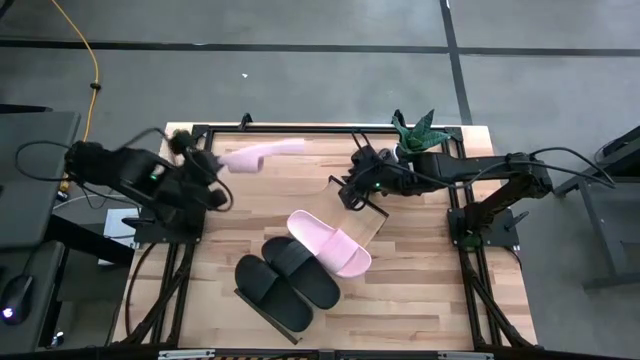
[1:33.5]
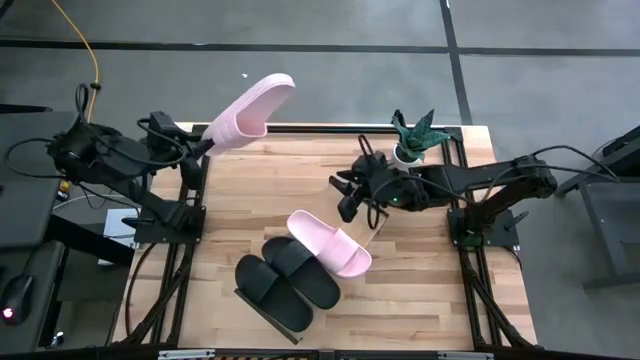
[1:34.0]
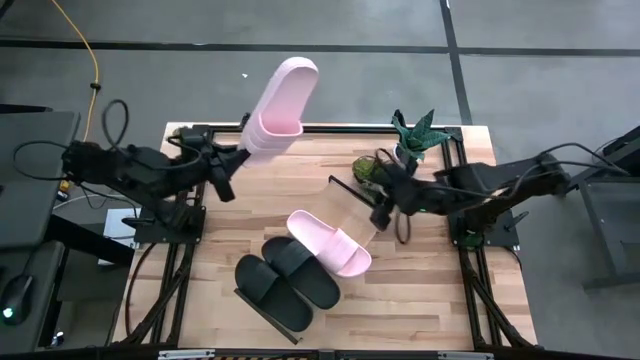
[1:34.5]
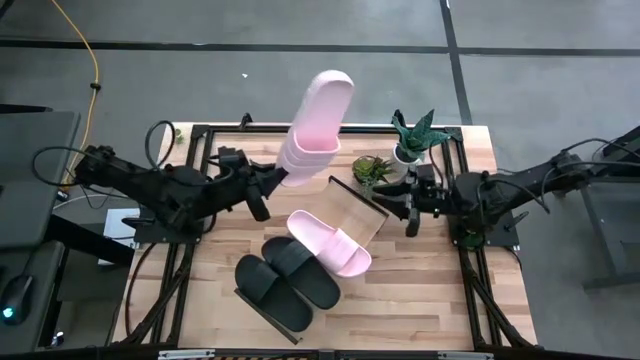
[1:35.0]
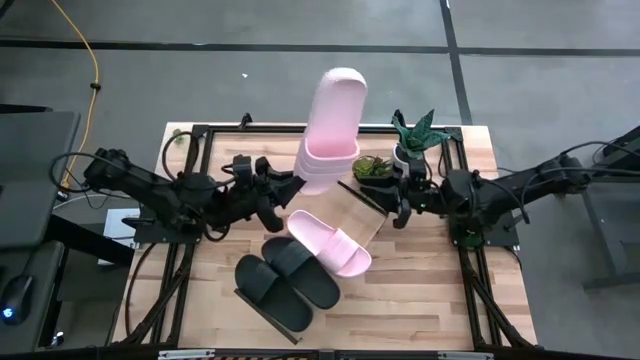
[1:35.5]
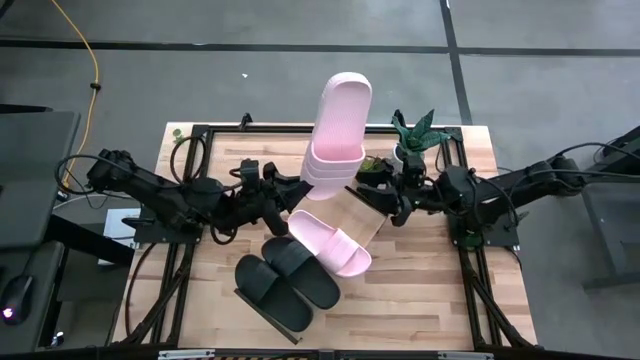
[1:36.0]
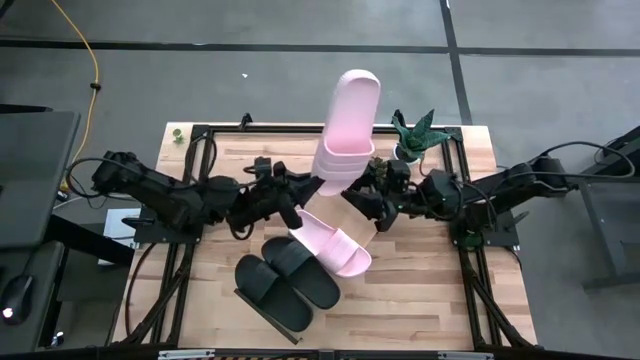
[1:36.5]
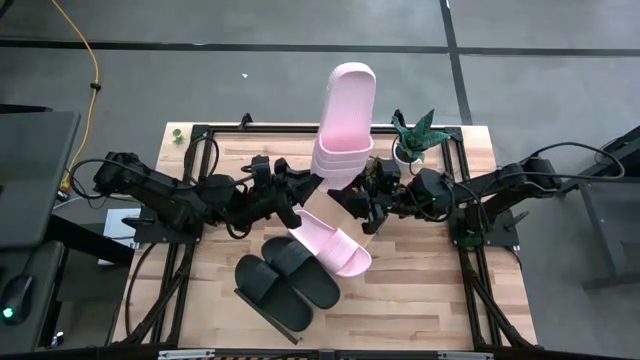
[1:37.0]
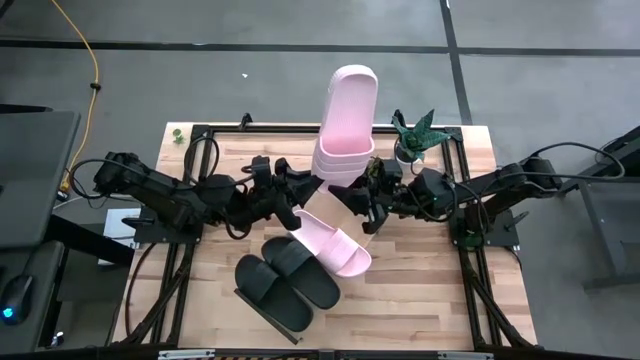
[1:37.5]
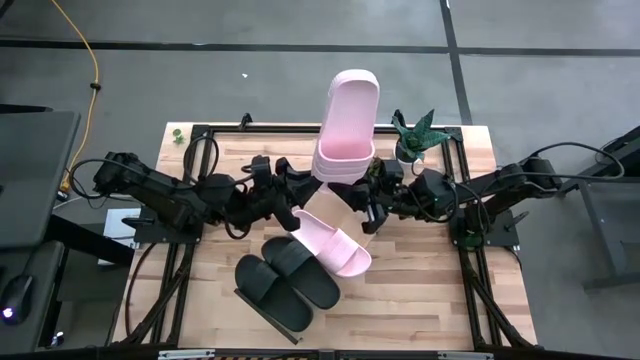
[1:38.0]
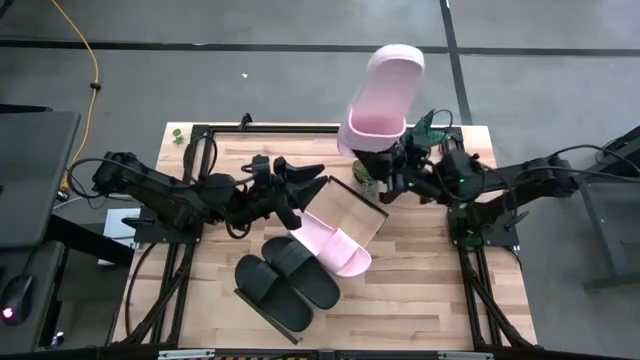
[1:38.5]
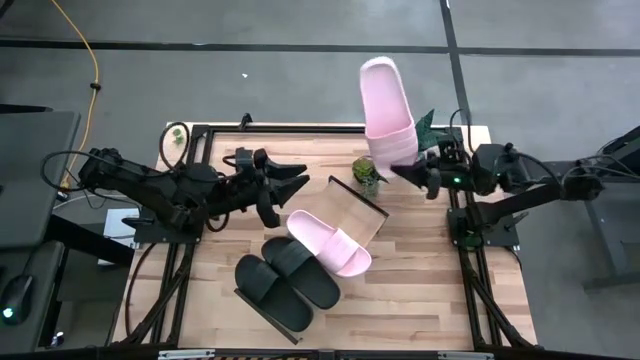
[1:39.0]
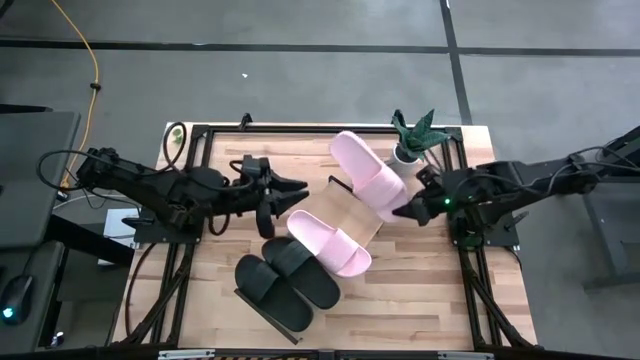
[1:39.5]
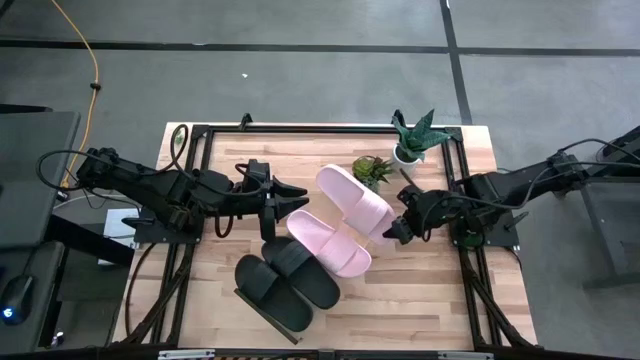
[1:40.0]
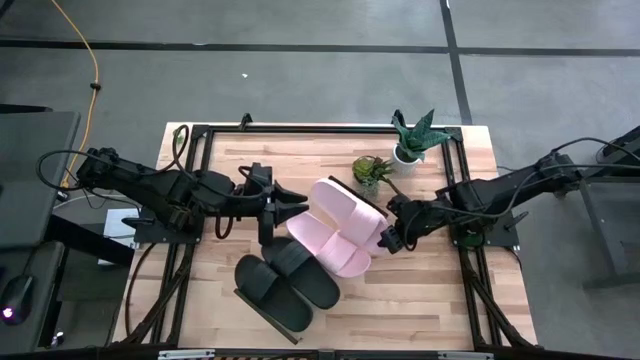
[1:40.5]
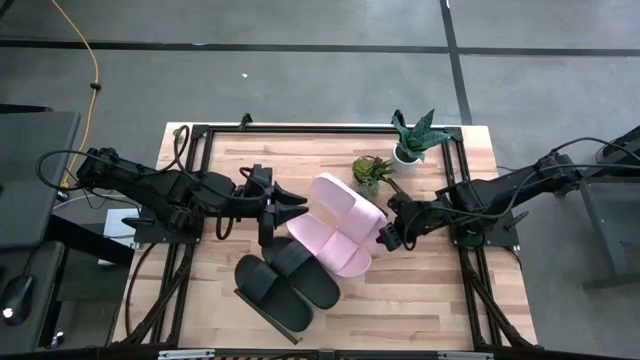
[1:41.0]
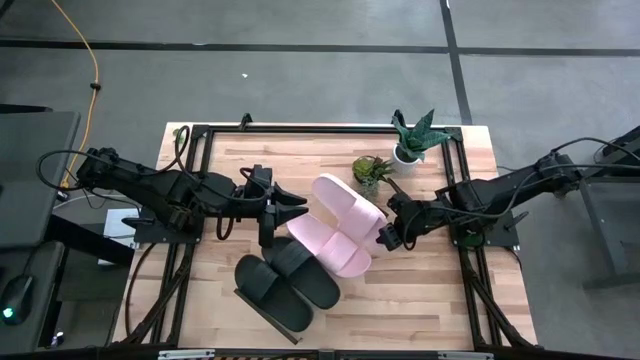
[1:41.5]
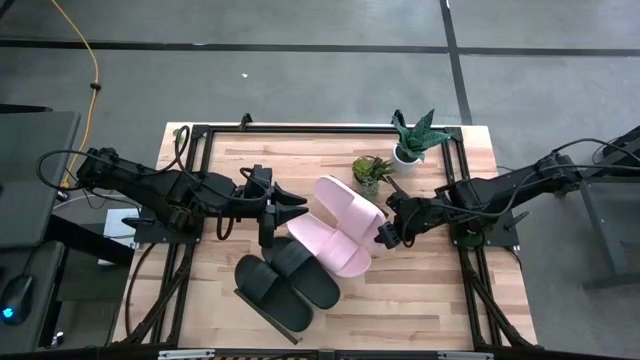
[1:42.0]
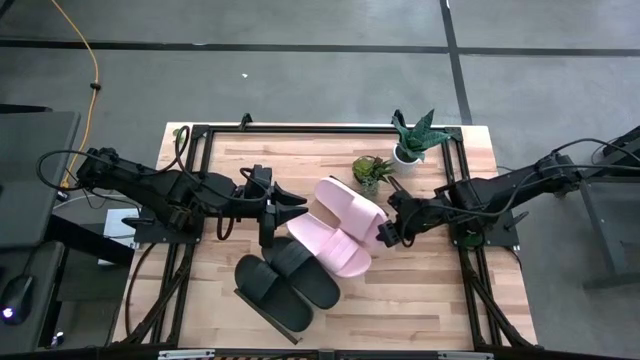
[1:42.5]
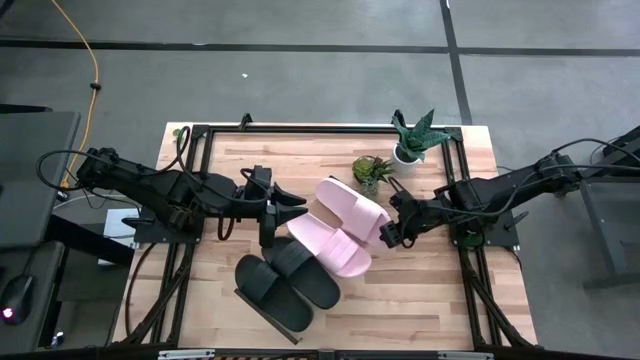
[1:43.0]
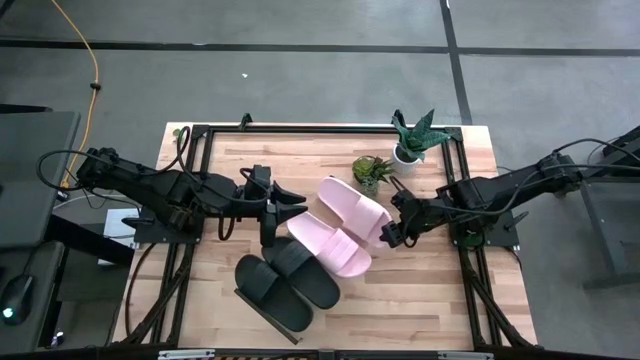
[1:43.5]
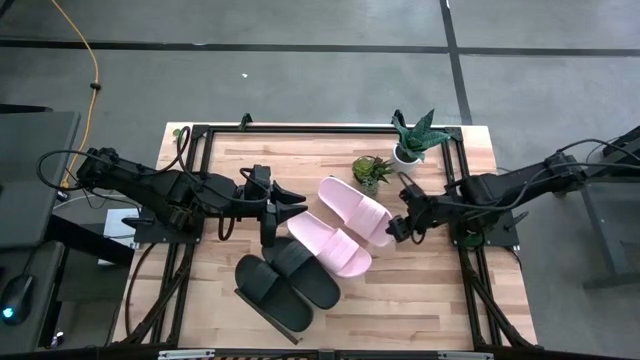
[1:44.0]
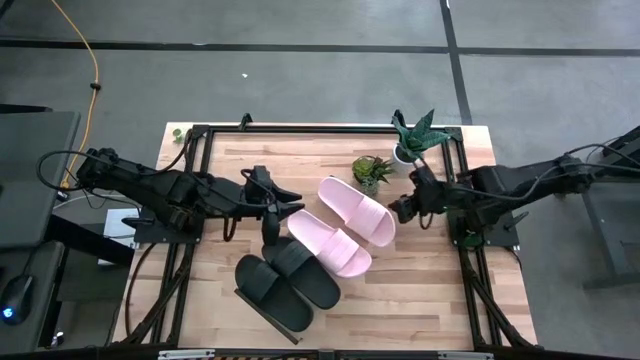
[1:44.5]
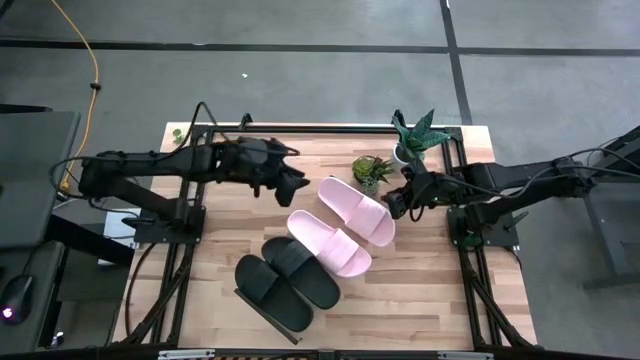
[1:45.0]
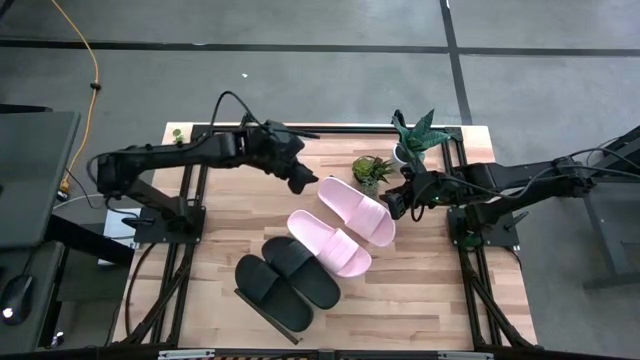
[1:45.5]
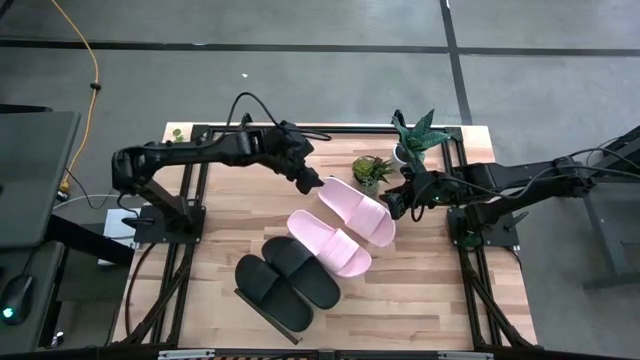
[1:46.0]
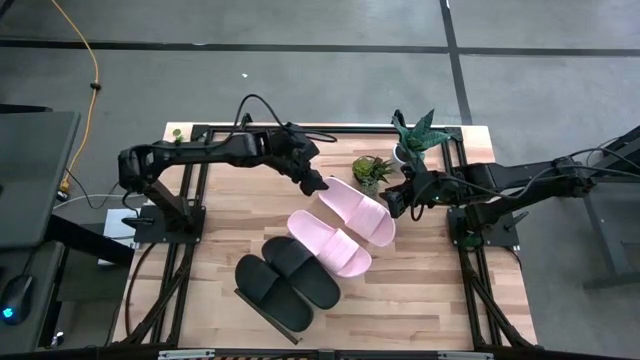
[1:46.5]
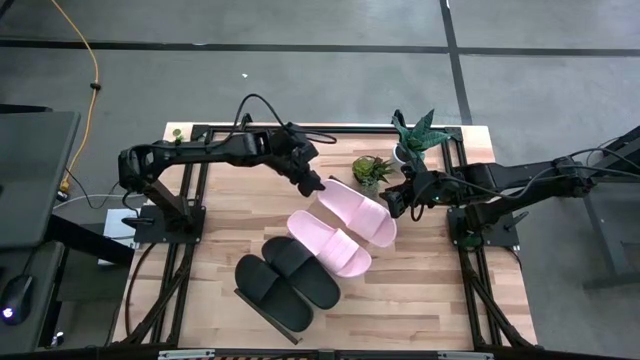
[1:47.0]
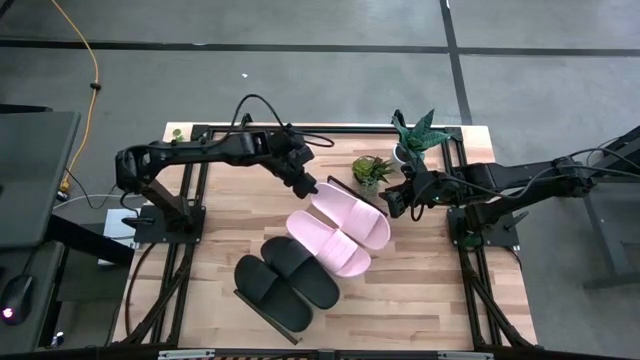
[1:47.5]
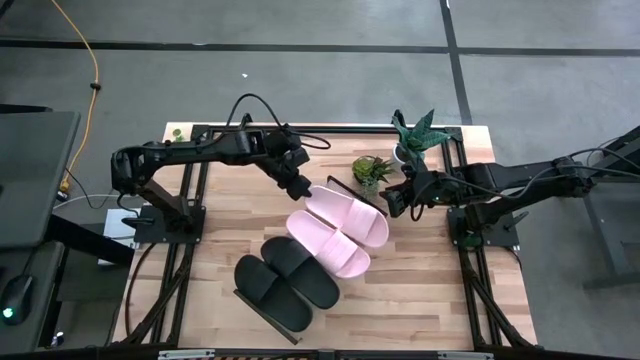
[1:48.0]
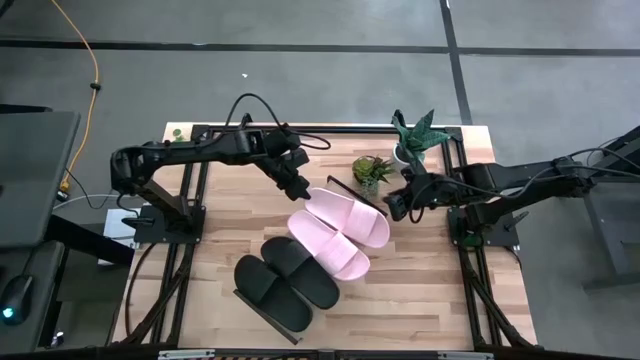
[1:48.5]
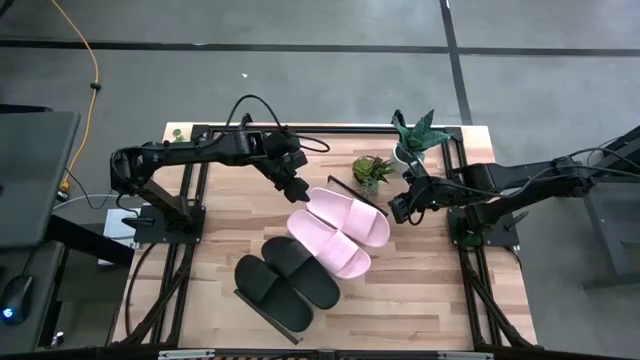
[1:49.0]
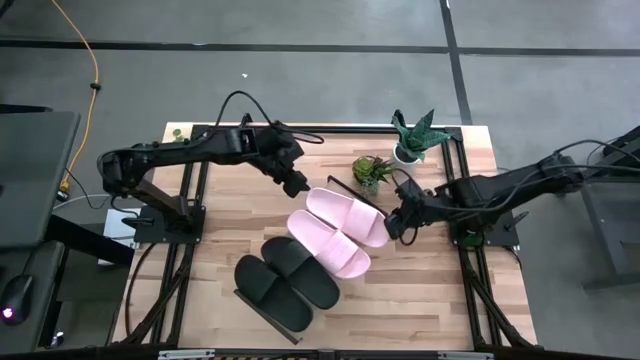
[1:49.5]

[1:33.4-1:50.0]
Task: Pick and place slides into the shelf
Put the pink slide on the shelf

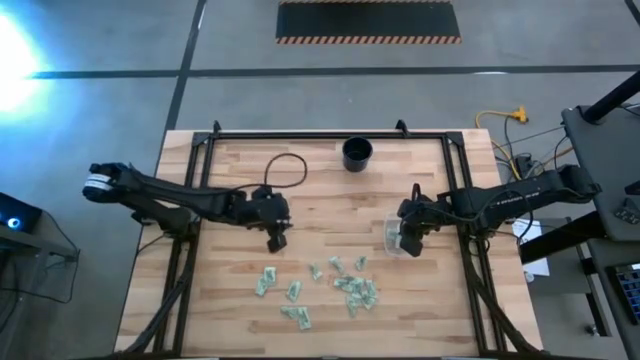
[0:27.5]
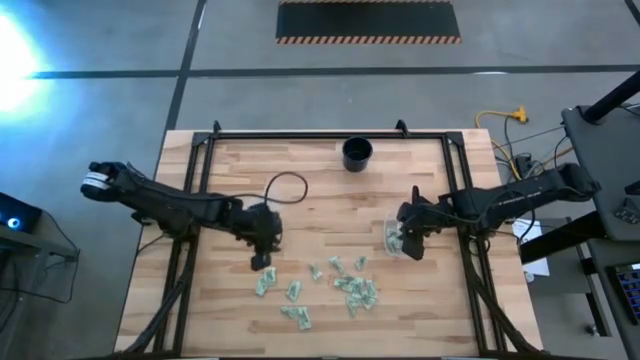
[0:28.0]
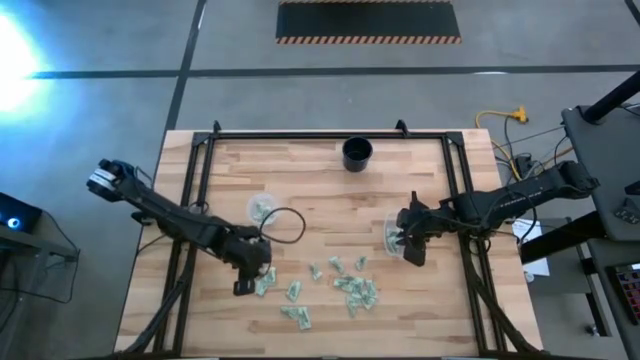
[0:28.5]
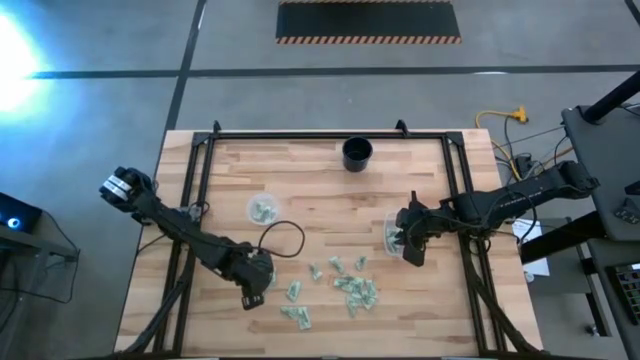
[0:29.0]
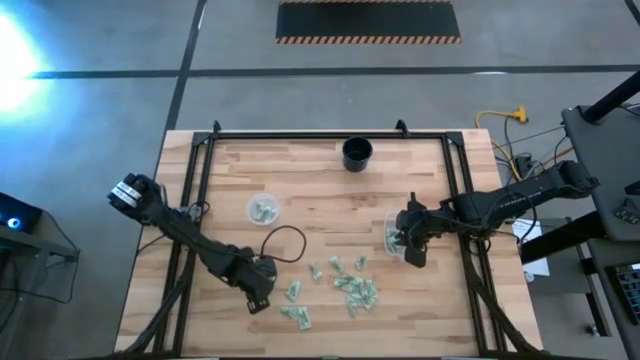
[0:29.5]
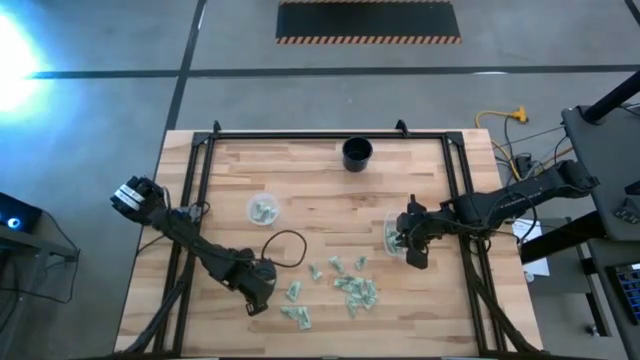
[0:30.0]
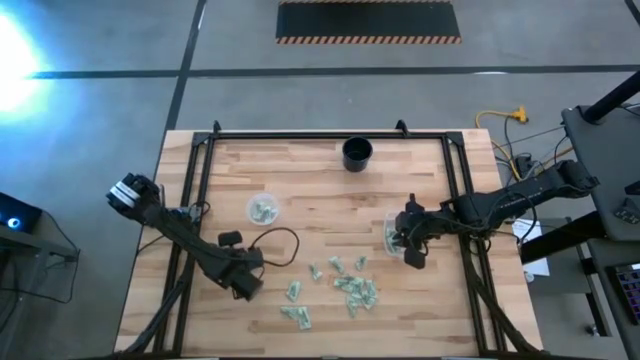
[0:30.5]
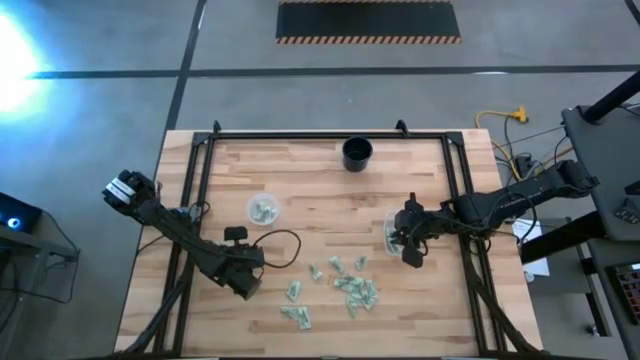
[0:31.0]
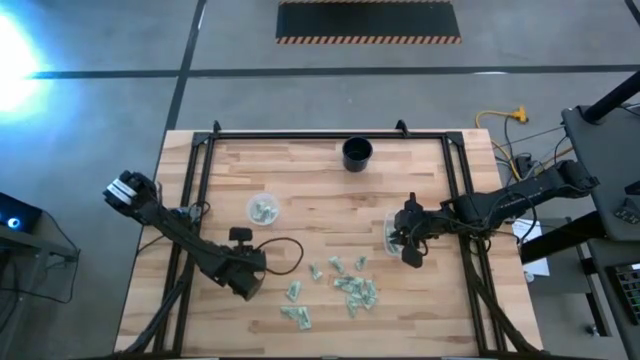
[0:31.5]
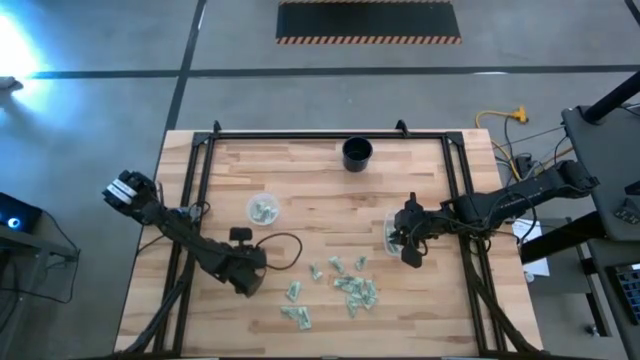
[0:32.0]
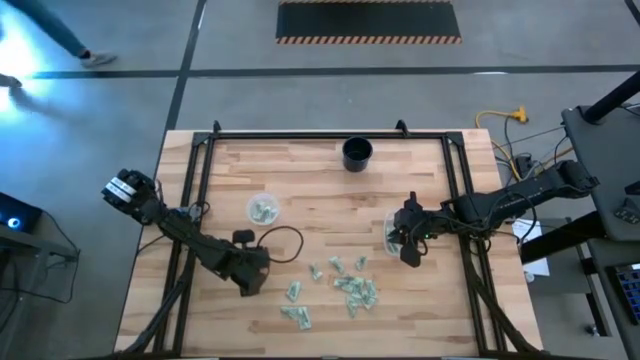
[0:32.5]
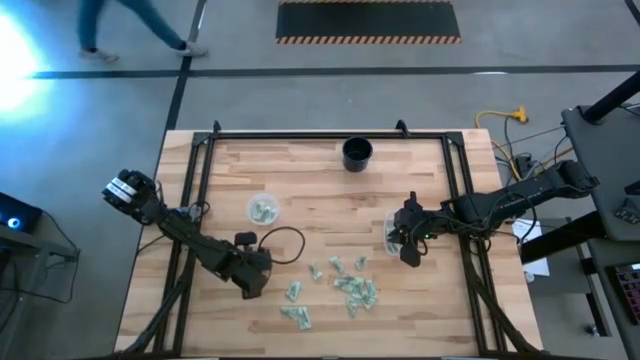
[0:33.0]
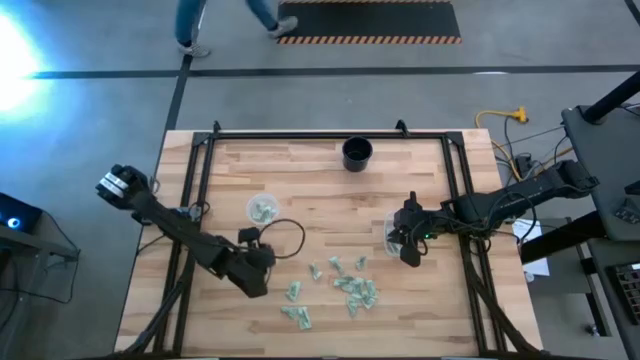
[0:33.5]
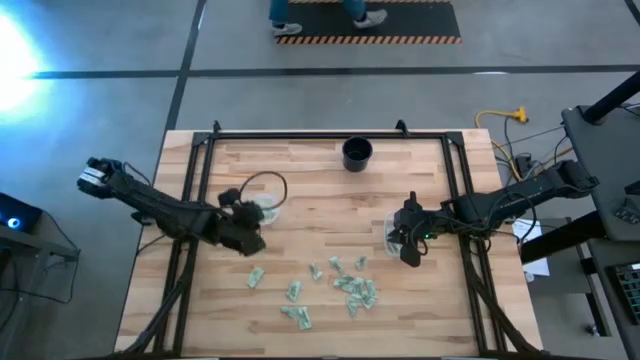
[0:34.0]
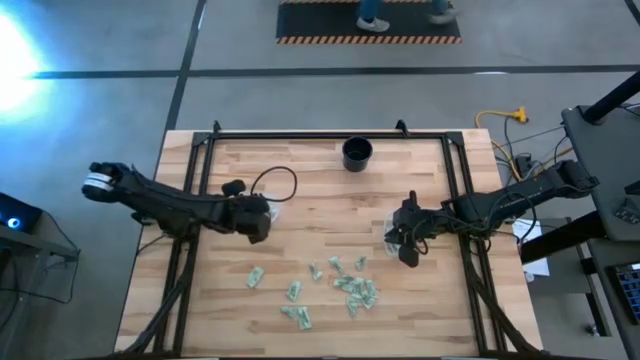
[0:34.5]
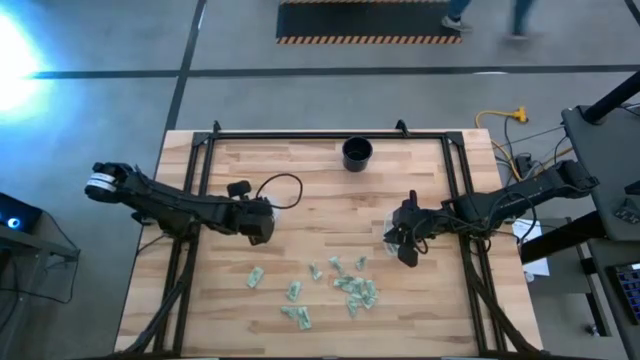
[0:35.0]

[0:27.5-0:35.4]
Task: Pick and place items into bin
Put the white sweetener packet into the left transparent bin
